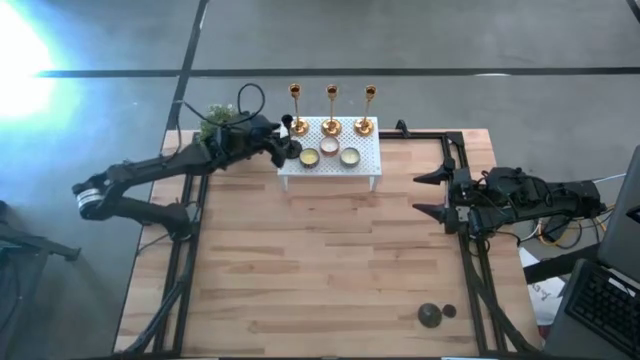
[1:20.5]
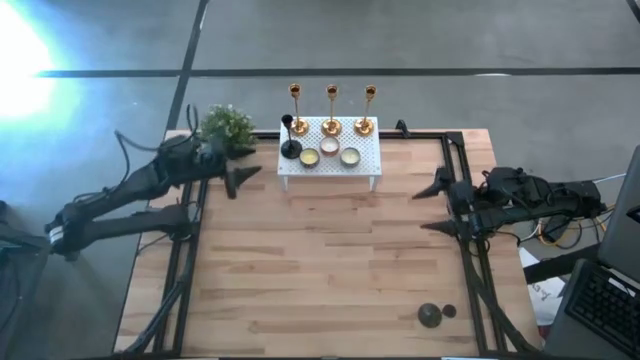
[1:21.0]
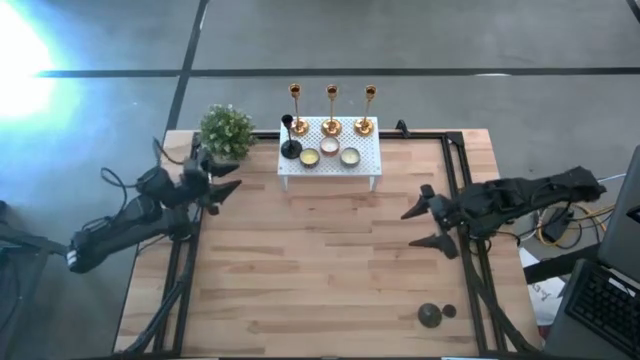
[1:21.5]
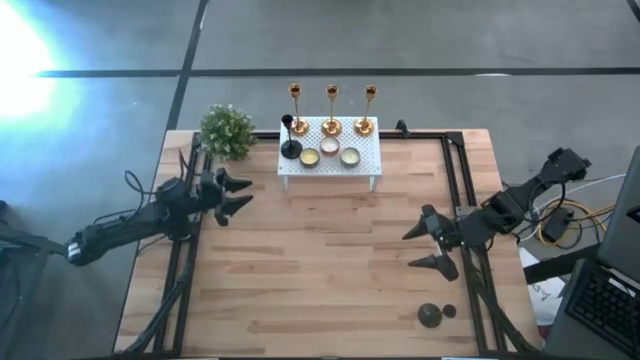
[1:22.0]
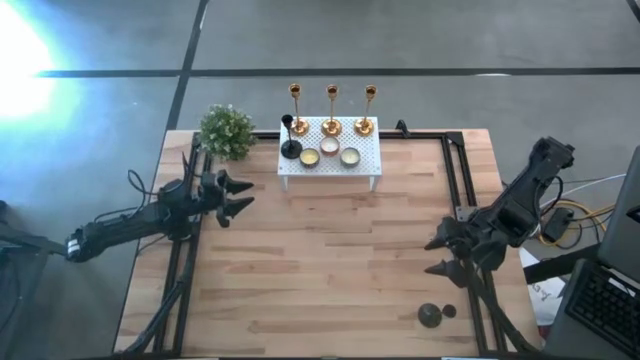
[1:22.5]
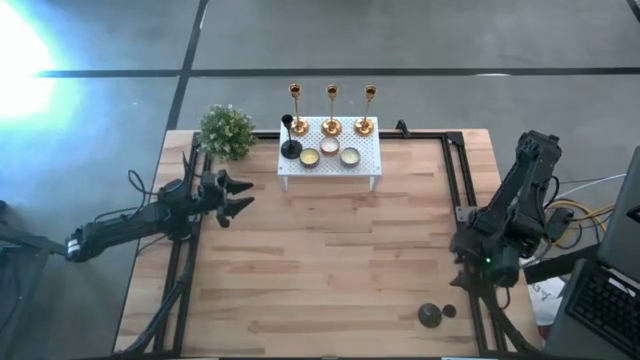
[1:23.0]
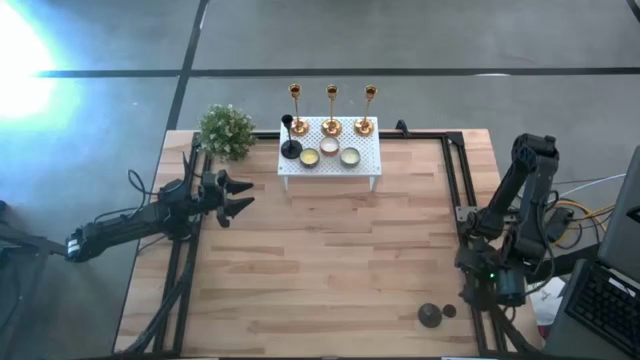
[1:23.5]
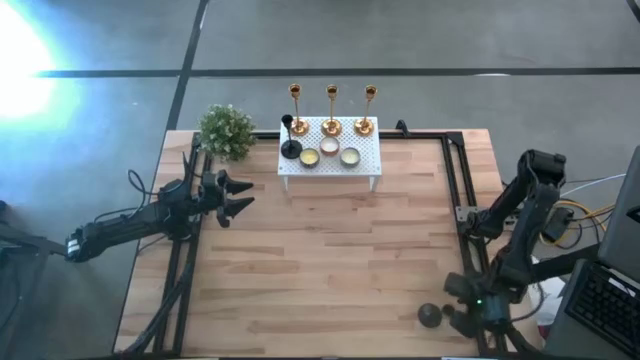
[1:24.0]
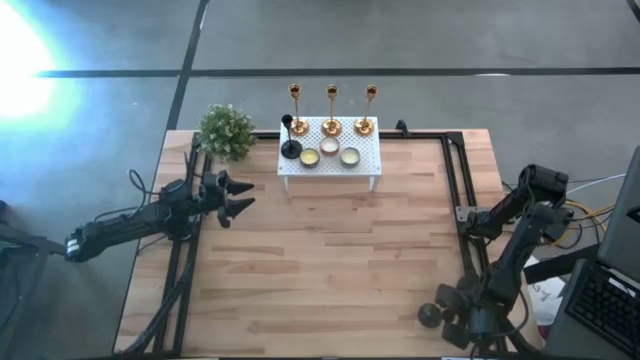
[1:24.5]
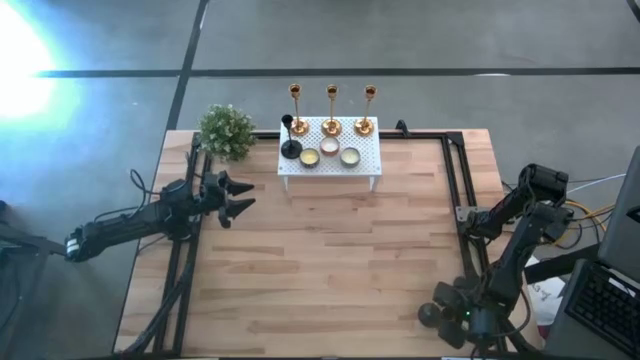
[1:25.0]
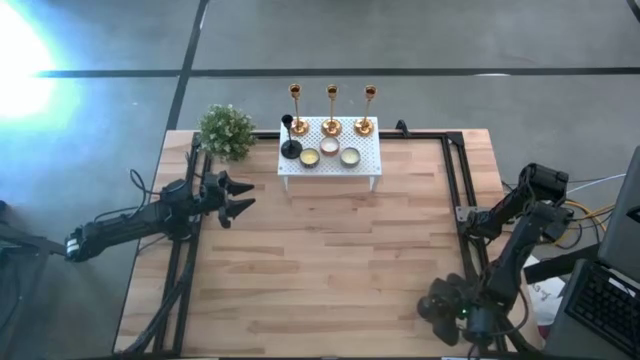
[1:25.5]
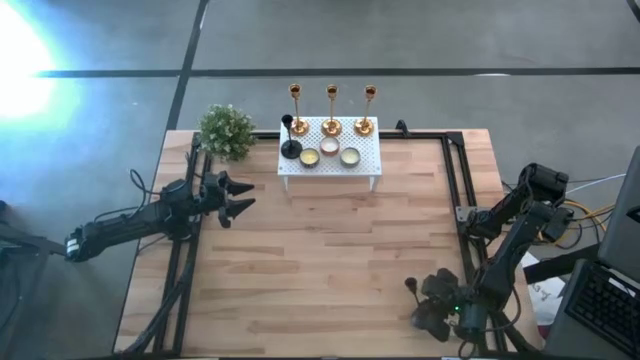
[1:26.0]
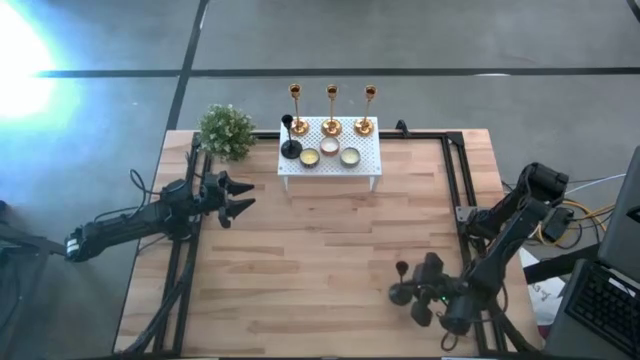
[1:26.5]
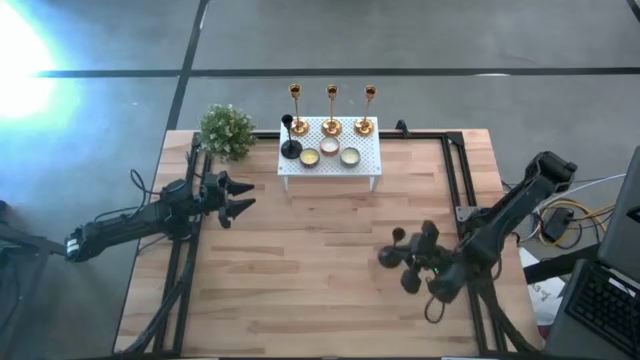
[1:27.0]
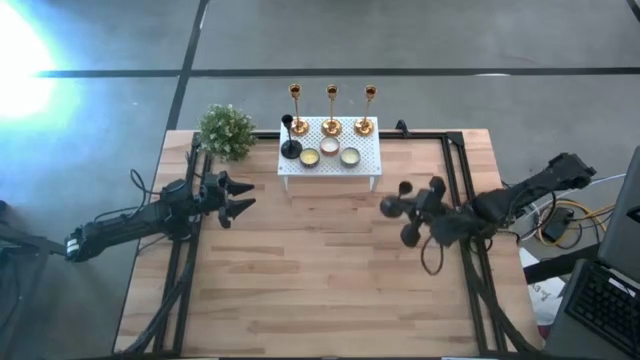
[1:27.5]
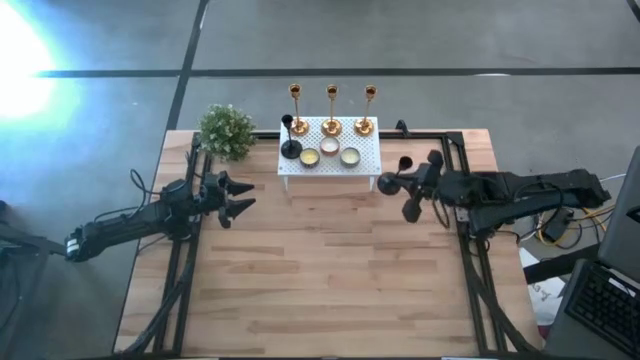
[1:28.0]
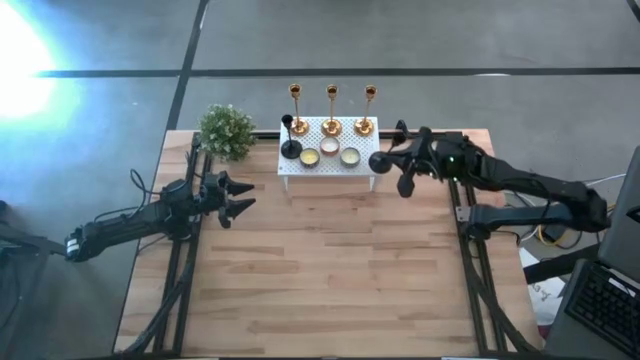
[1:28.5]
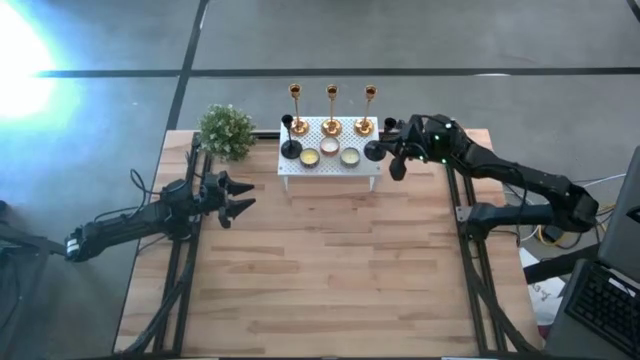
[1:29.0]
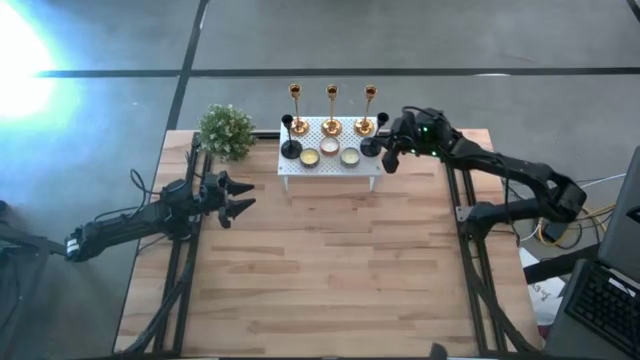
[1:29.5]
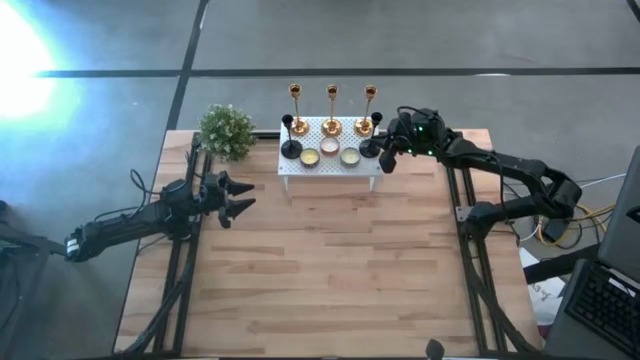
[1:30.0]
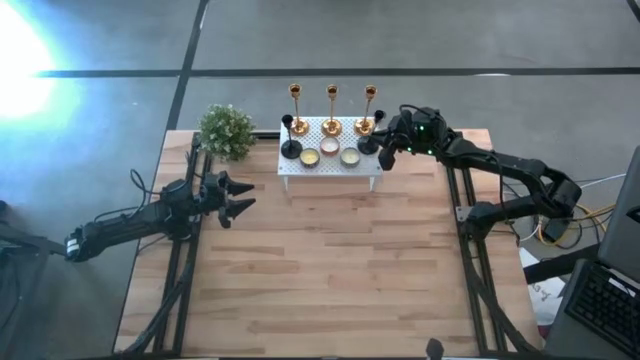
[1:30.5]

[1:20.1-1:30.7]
Task: Pick & Place candle stick holders
Put the black candle holder on the shelf

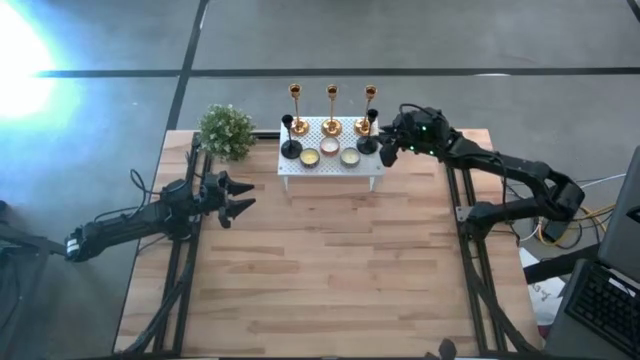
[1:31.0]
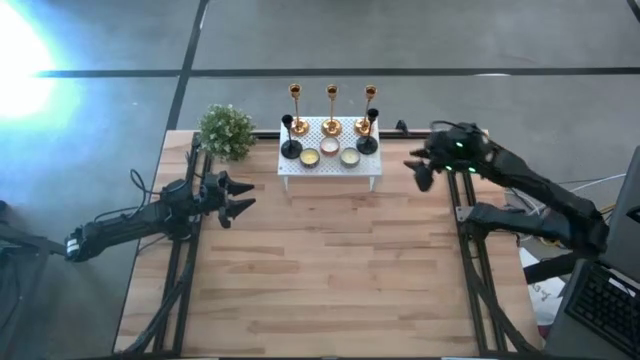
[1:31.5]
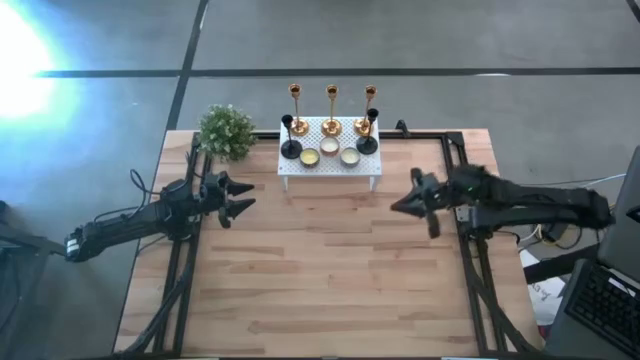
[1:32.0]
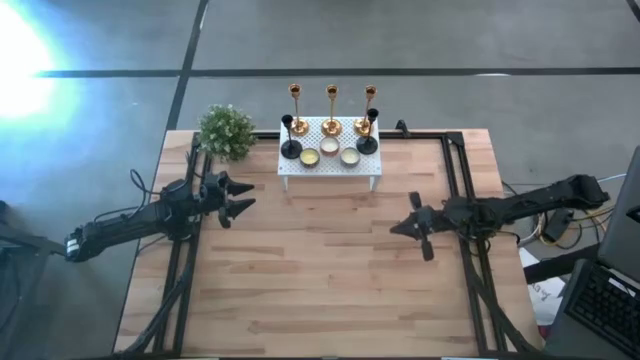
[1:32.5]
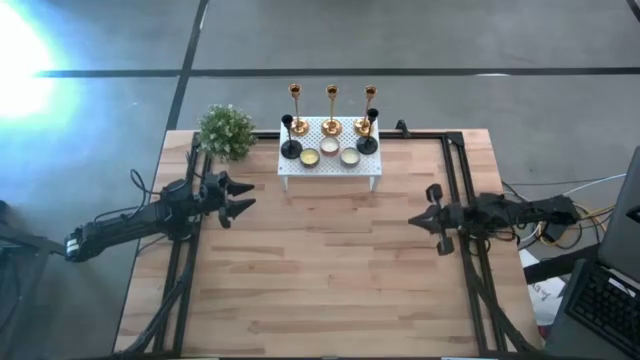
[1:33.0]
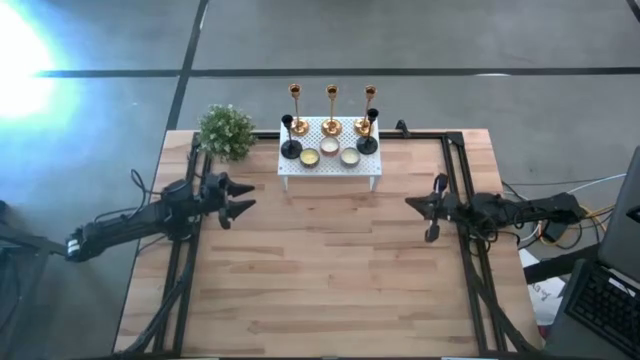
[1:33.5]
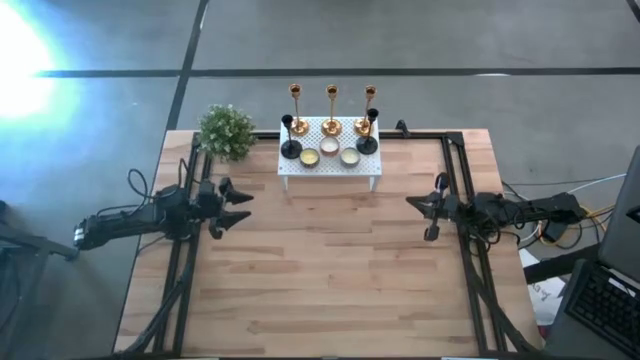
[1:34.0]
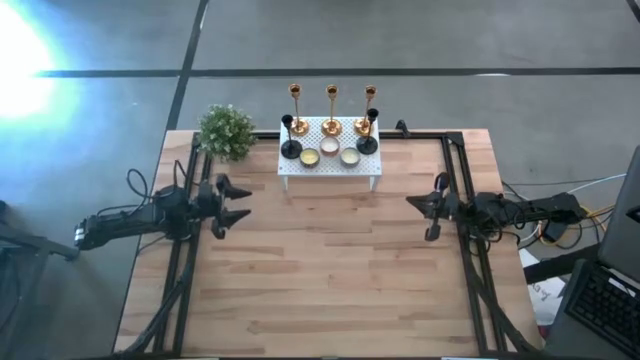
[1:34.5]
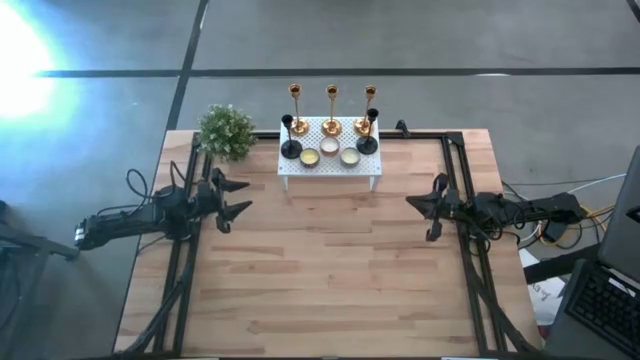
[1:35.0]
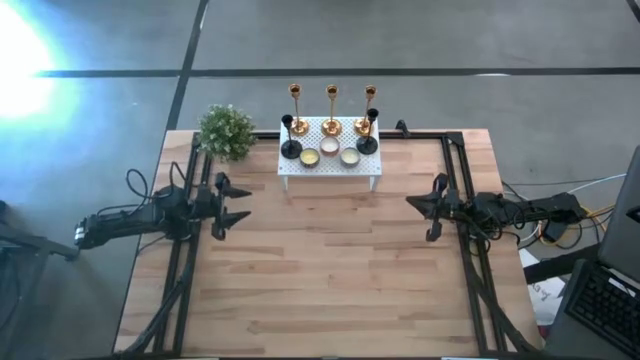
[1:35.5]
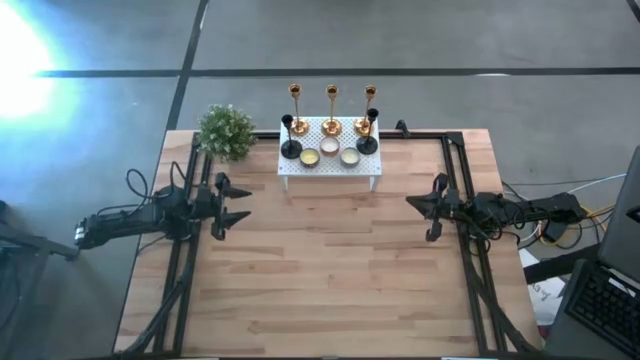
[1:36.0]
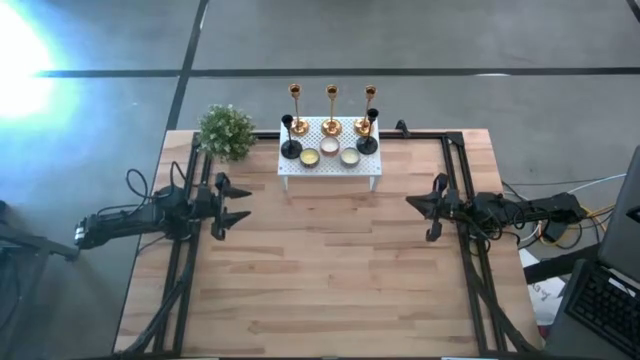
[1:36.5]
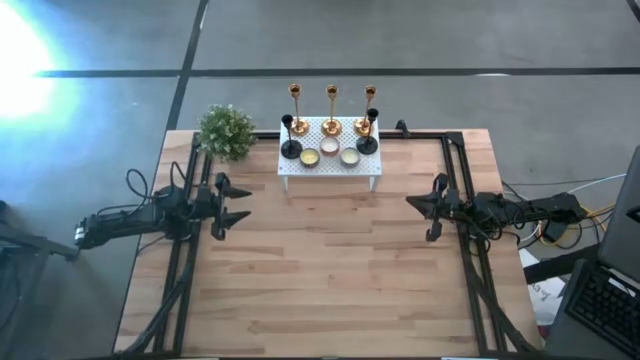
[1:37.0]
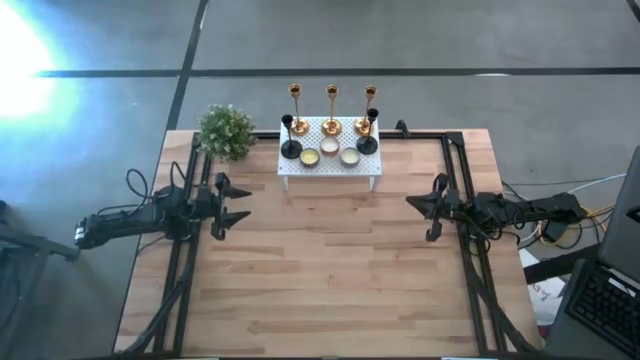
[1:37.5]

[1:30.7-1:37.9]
Return to Home Position

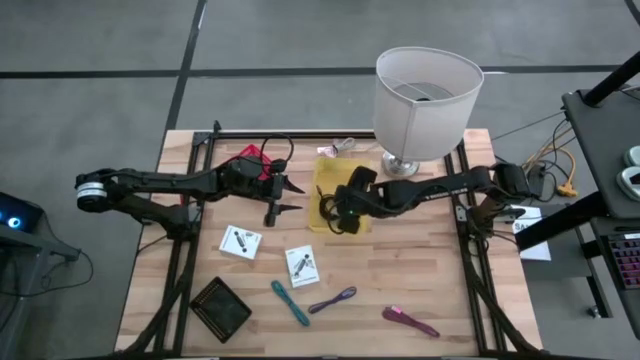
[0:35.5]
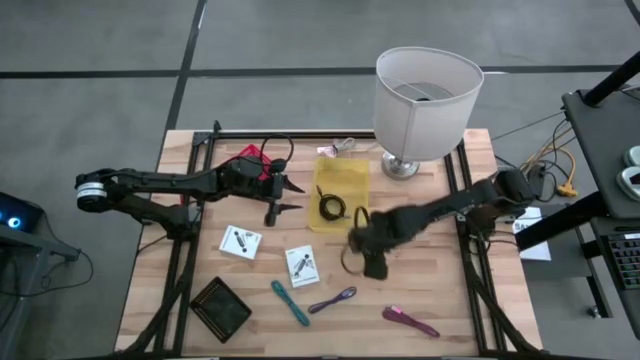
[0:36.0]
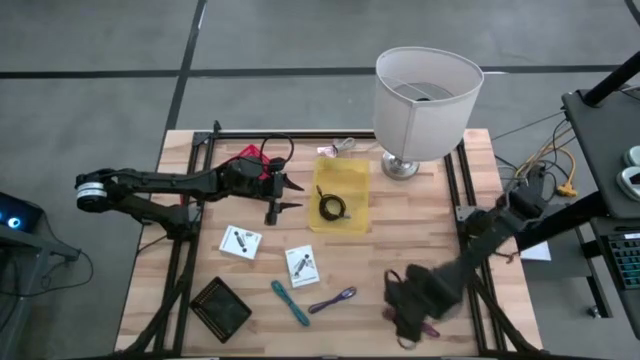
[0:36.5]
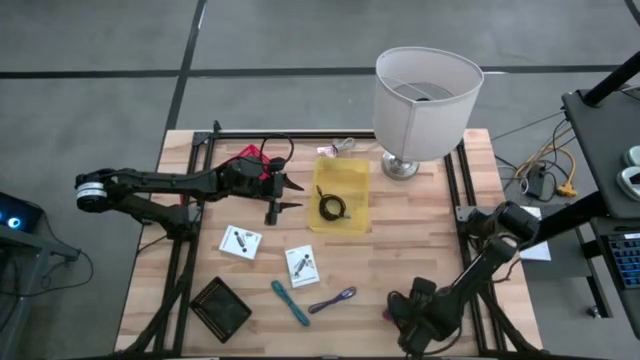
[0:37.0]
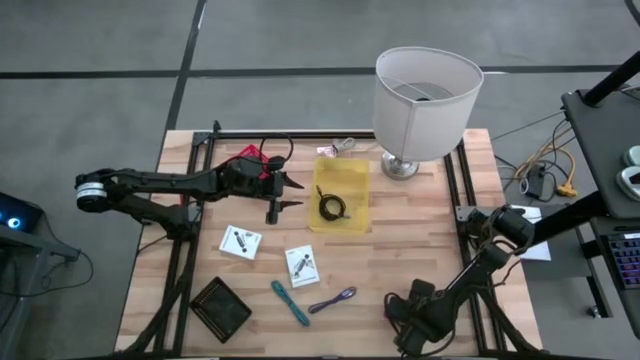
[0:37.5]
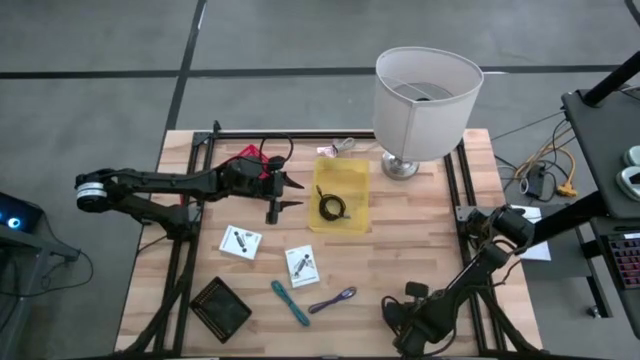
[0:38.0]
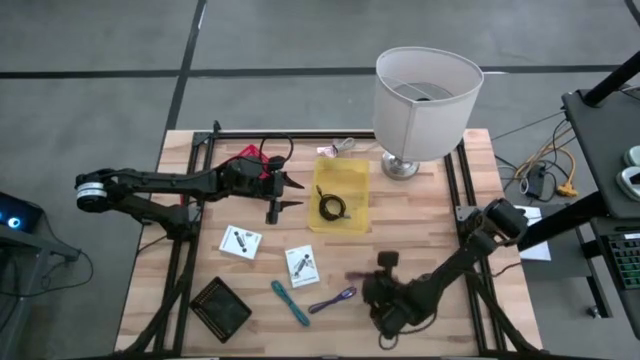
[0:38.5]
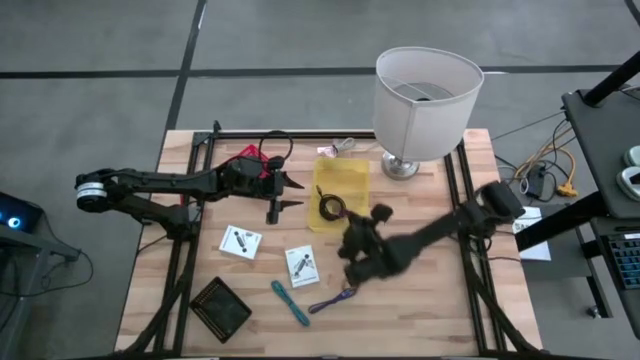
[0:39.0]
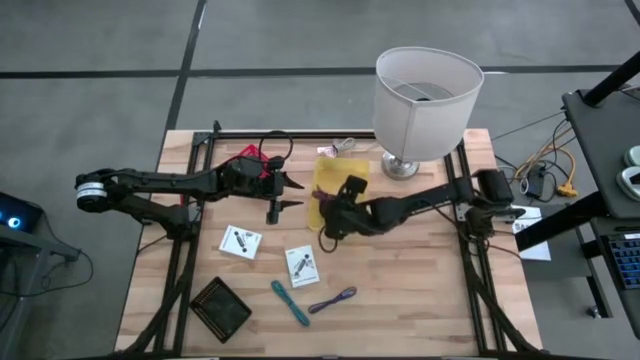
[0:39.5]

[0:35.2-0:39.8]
Task: Pick and place items into bin
Put the pink charger cable into the yellow bin
